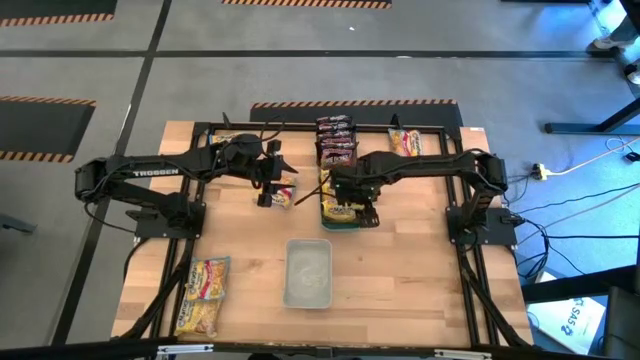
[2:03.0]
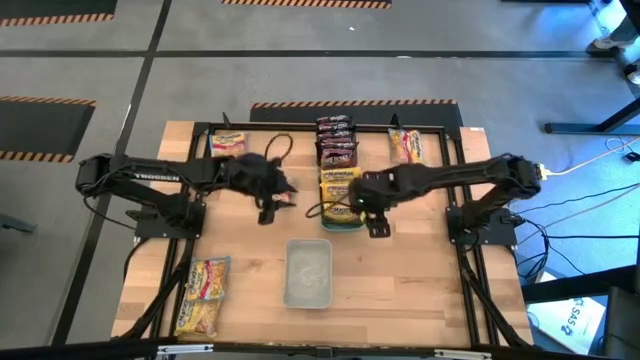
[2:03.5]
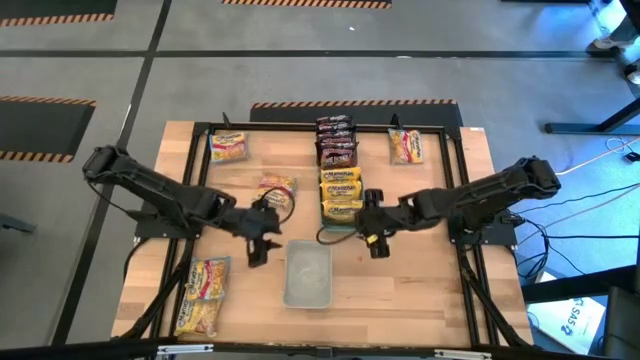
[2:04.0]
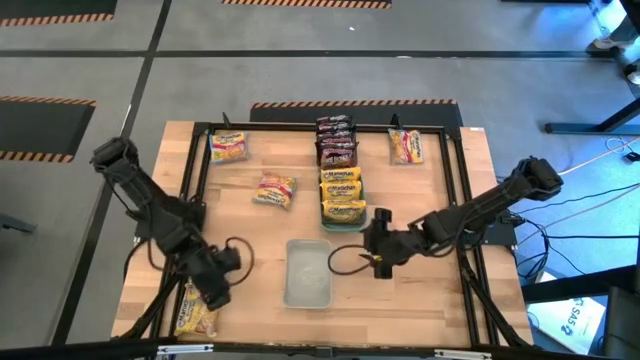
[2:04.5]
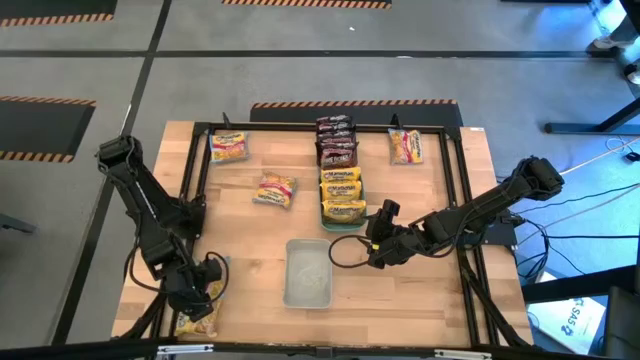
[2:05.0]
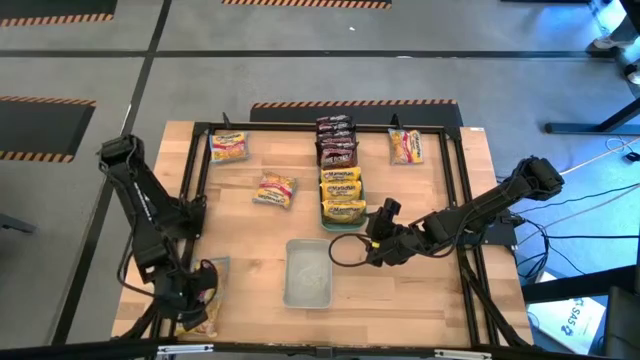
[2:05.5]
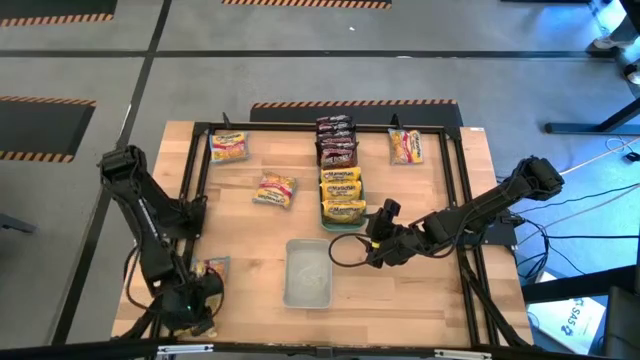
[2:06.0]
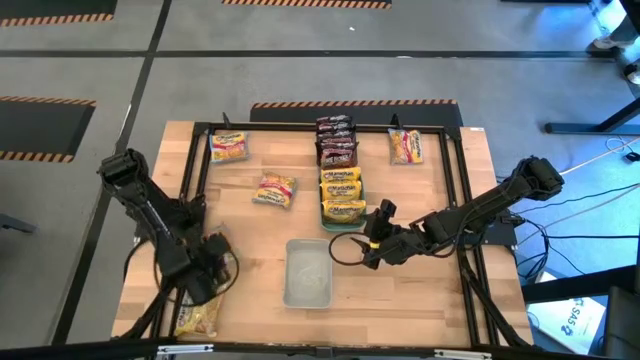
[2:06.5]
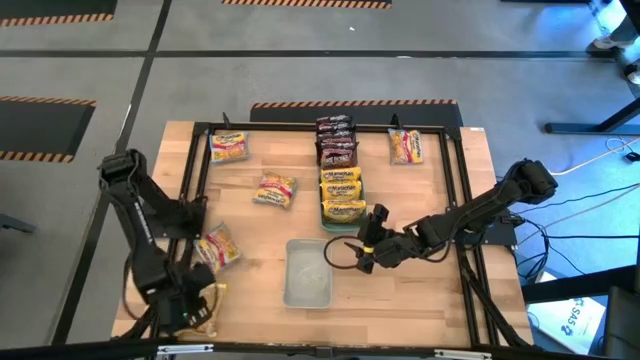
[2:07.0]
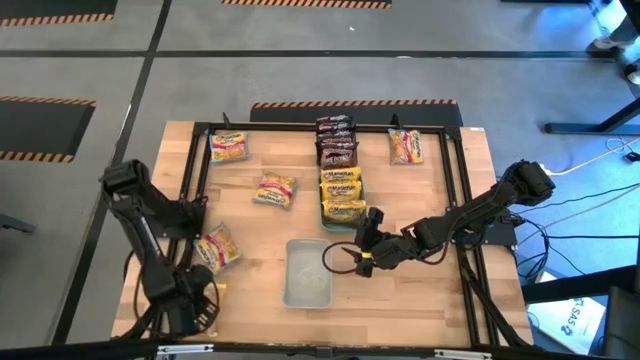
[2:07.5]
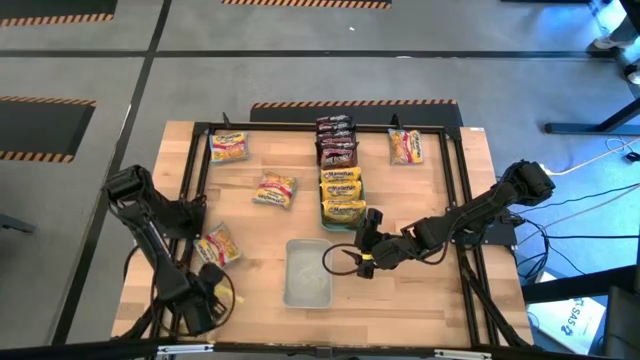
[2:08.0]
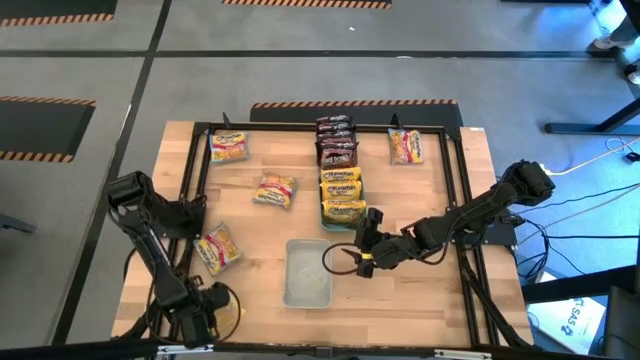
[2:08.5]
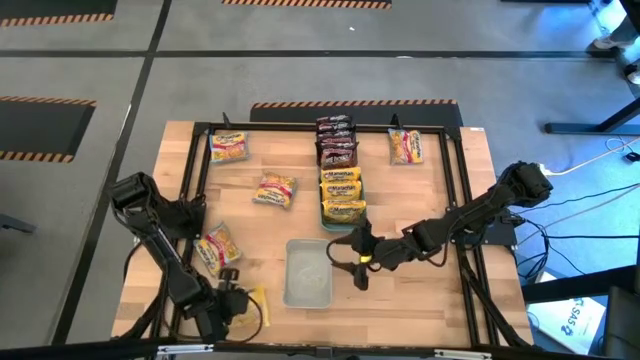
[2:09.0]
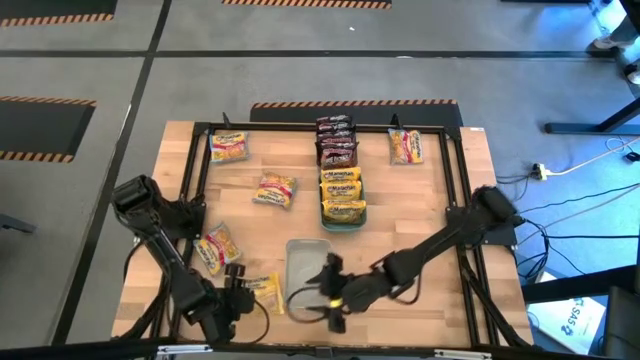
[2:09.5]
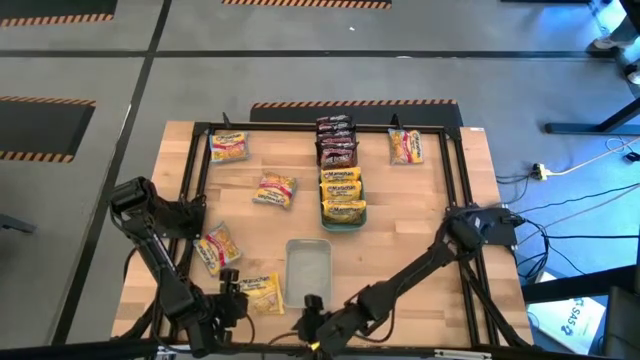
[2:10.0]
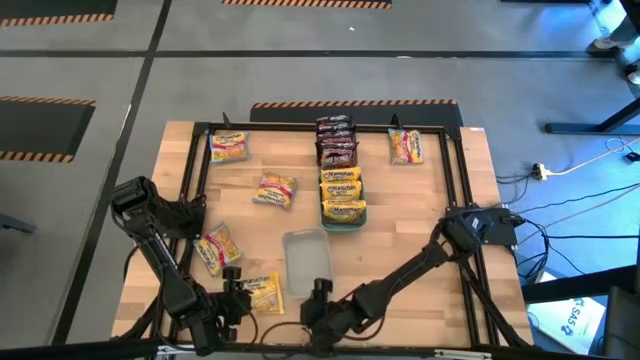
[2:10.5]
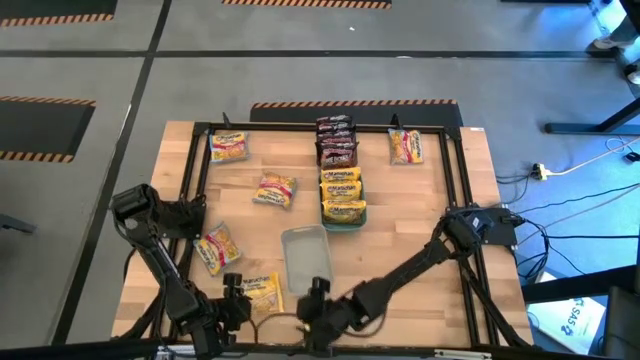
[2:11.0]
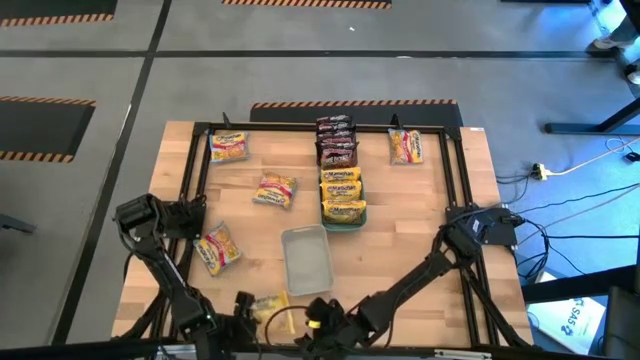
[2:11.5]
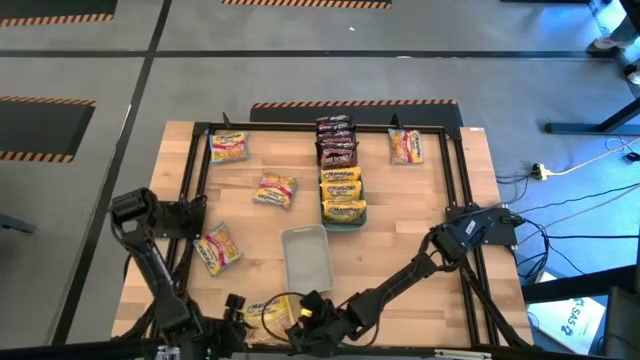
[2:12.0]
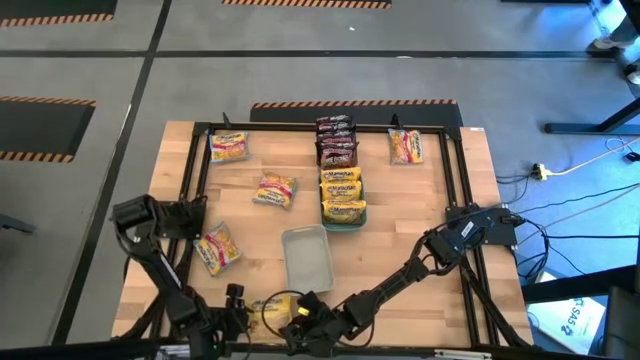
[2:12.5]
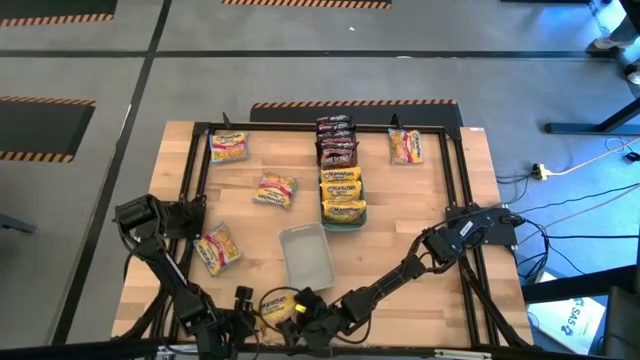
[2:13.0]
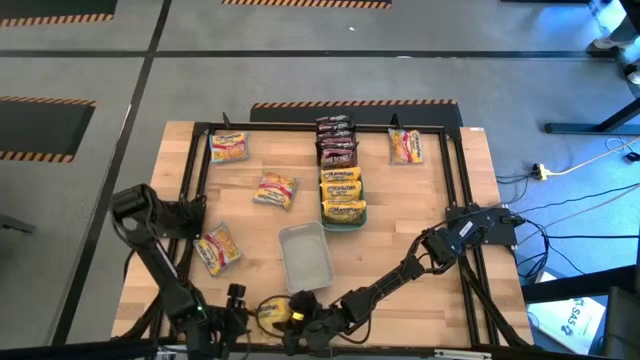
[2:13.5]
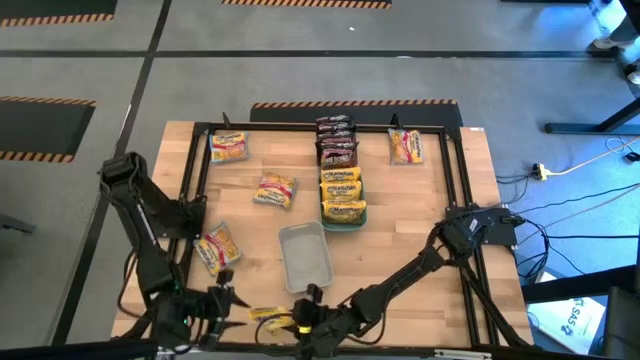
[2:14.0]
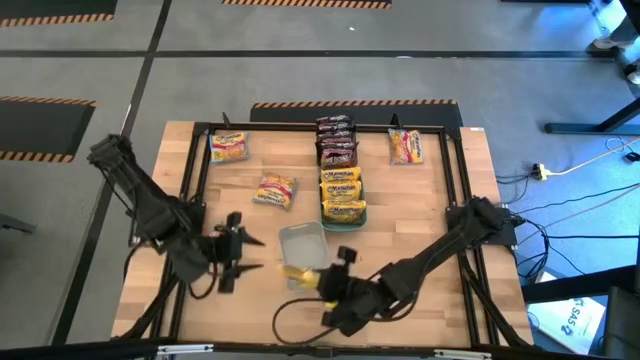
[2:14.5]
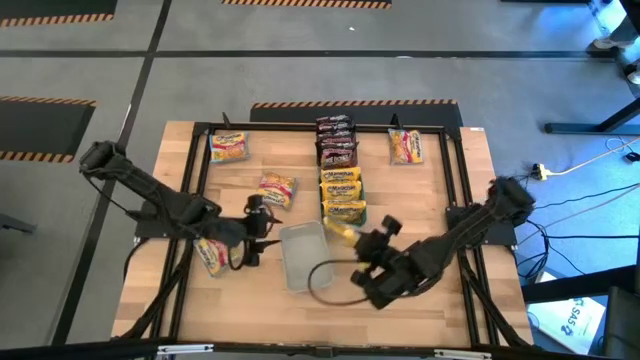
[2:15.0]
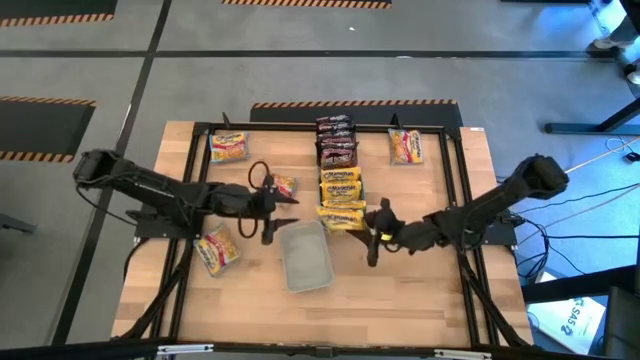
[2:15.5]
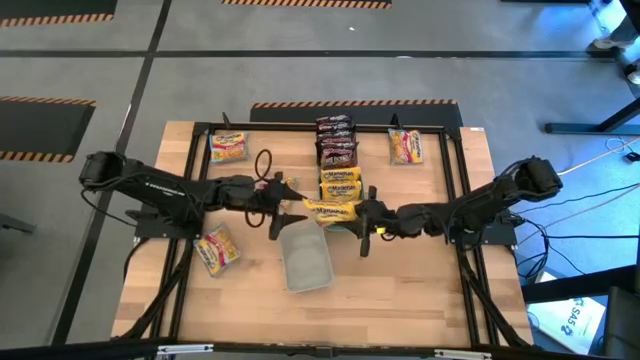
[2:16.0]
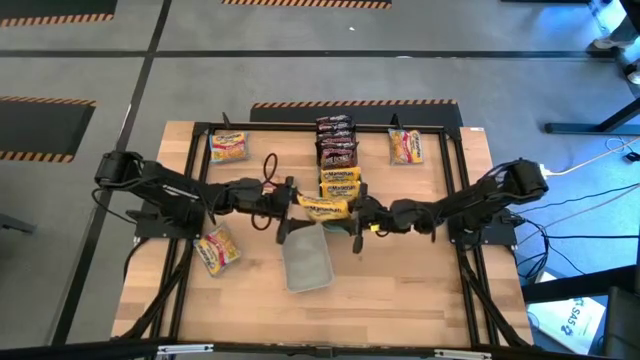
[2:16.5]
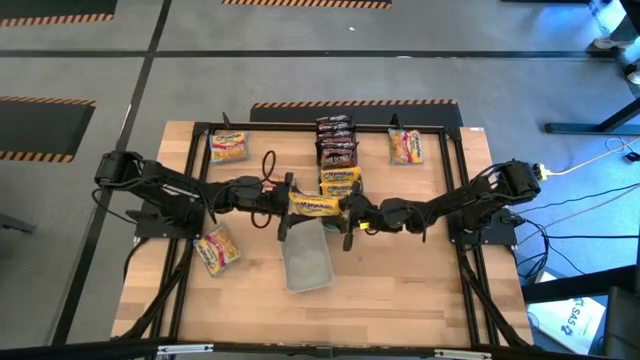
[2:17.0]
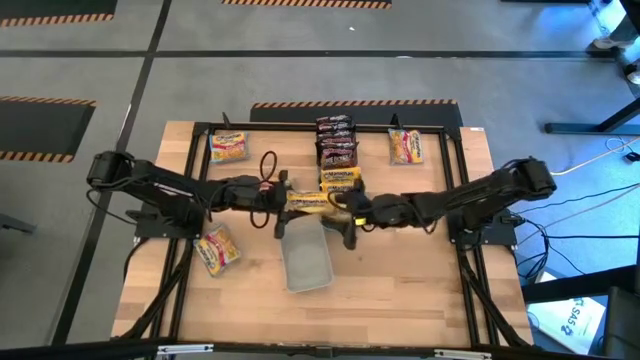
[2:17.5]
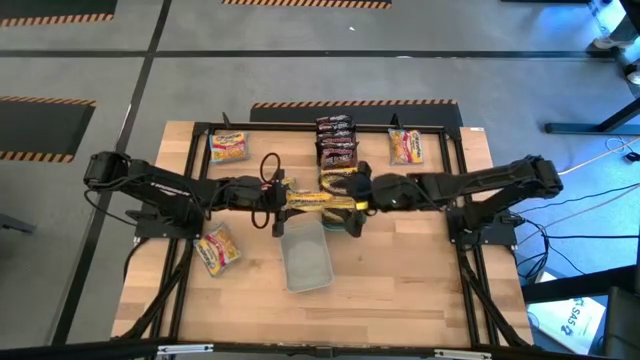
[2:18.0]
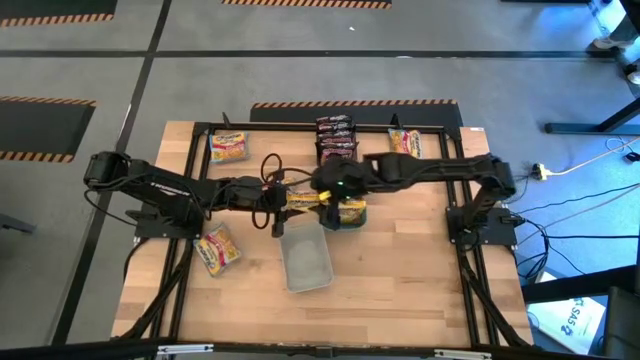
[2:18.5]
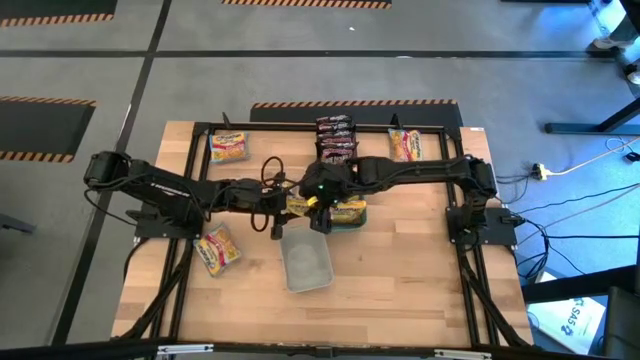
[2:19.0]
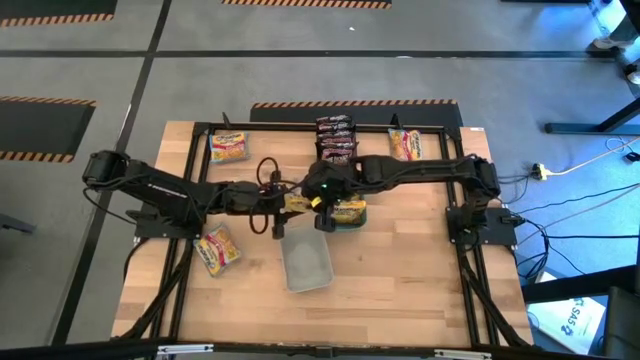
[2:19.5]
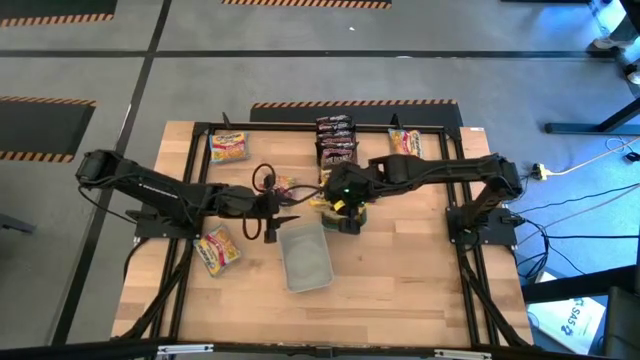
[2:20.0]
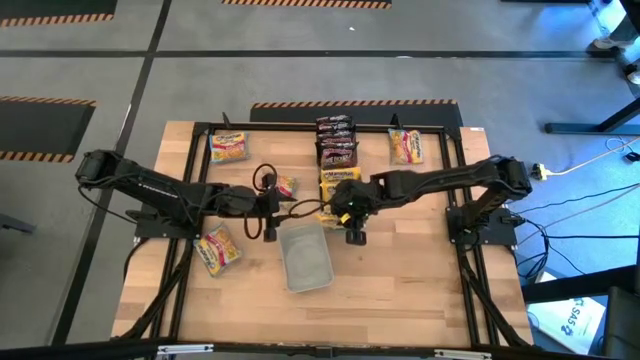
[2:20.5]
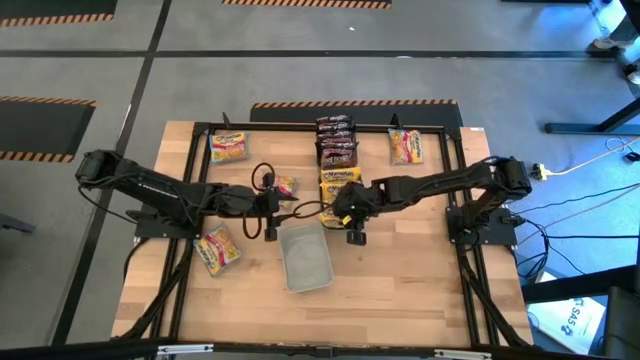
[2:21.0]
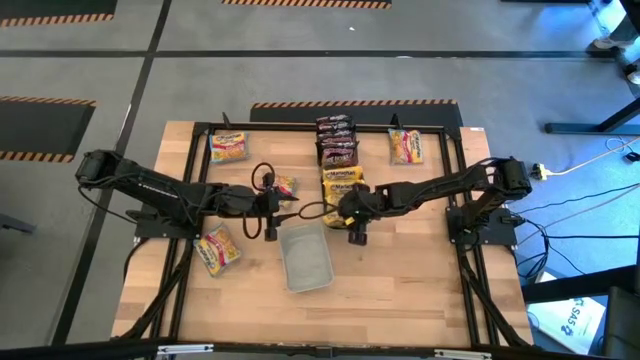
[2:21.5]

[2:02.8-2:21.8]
Task: Sort Maruchan noodles
Put the yellow noodle pack into the green bin

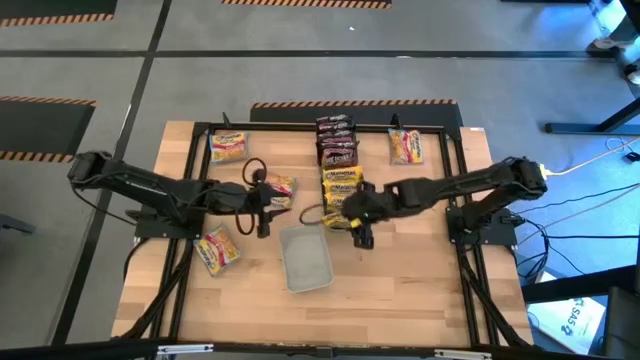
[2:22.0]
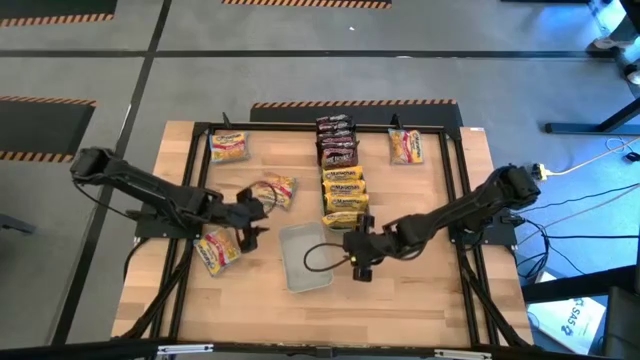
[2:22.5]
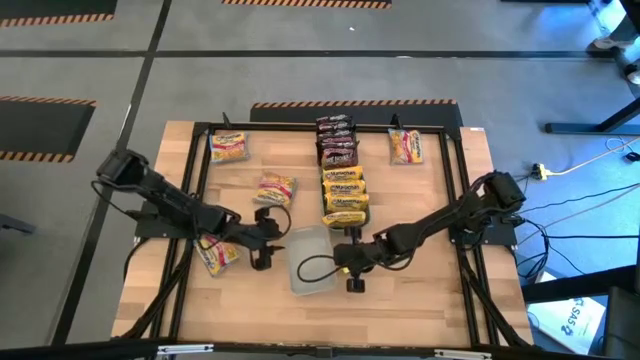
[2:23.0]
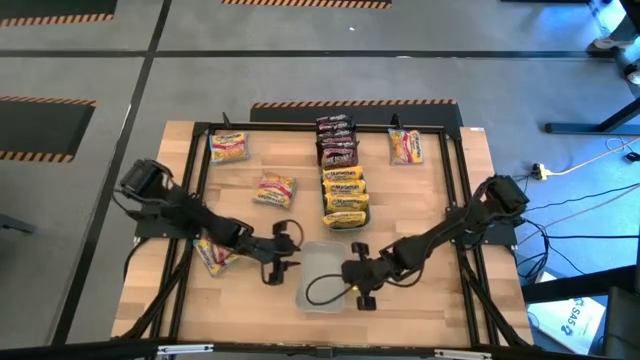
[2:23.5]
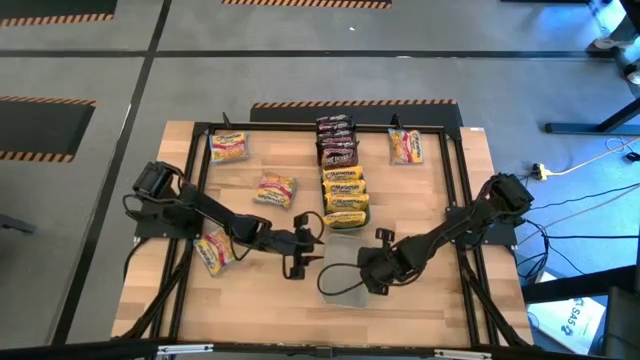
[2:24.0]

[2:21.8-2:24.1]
Move the gray bin to the bottom of the table
